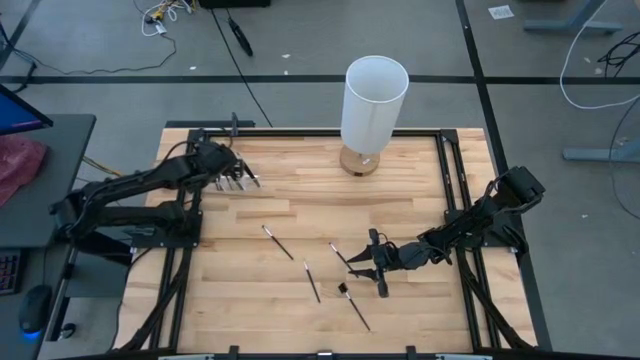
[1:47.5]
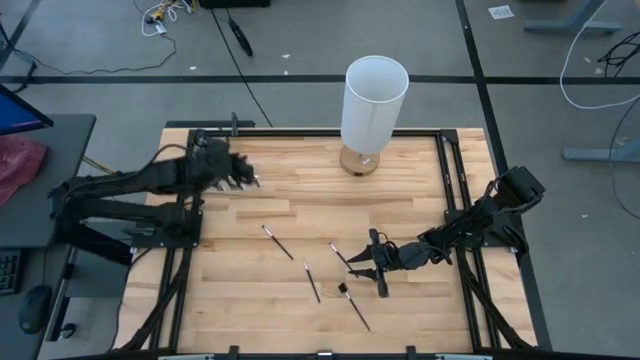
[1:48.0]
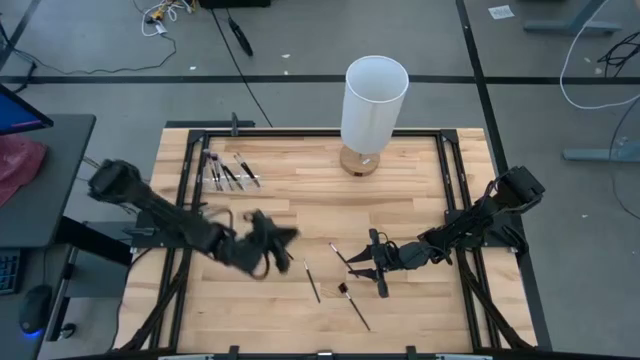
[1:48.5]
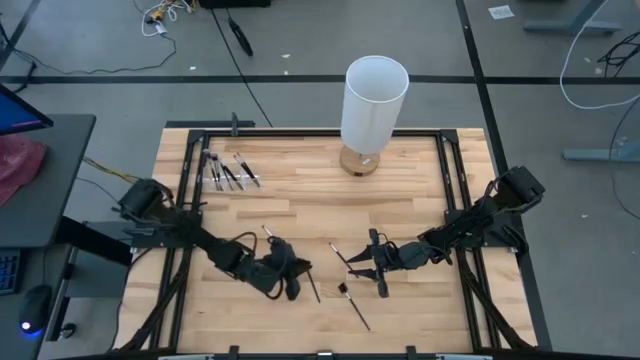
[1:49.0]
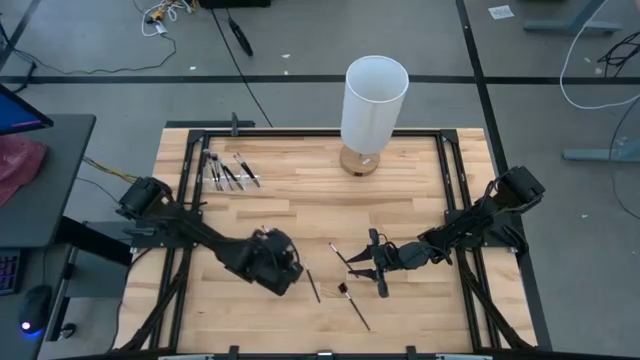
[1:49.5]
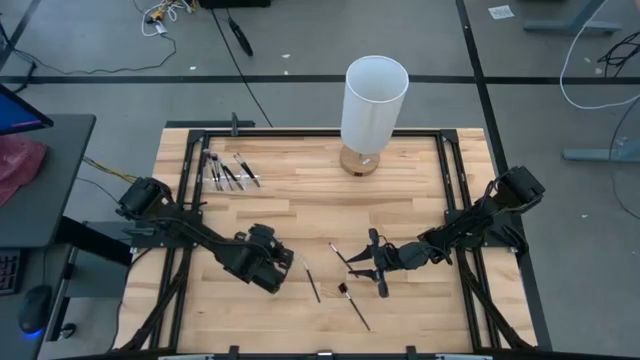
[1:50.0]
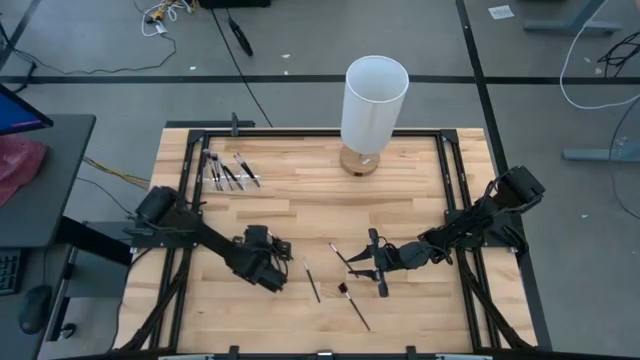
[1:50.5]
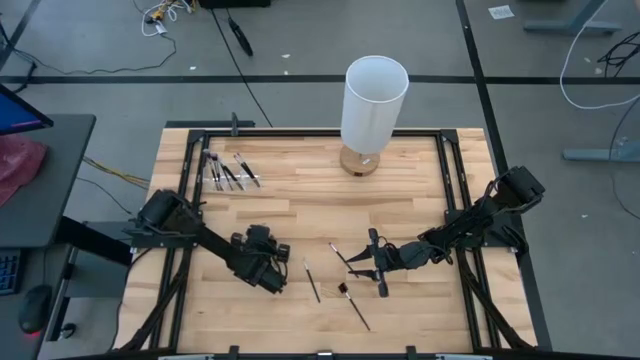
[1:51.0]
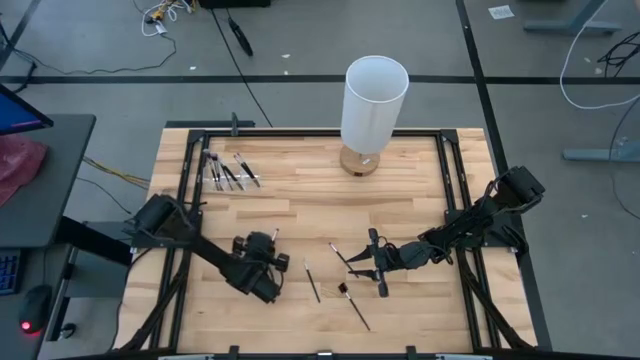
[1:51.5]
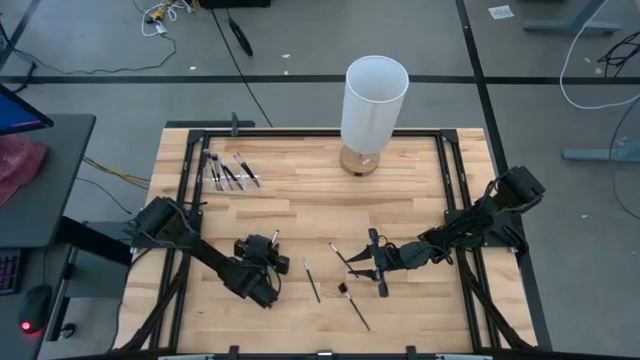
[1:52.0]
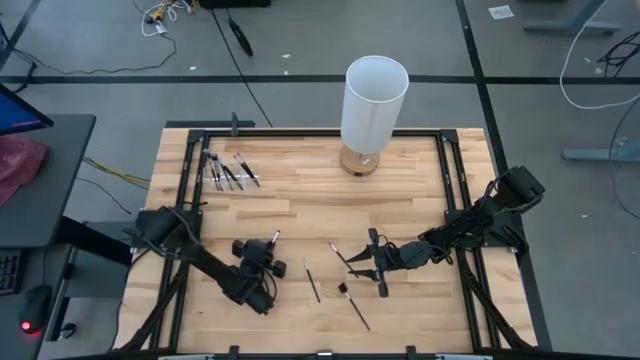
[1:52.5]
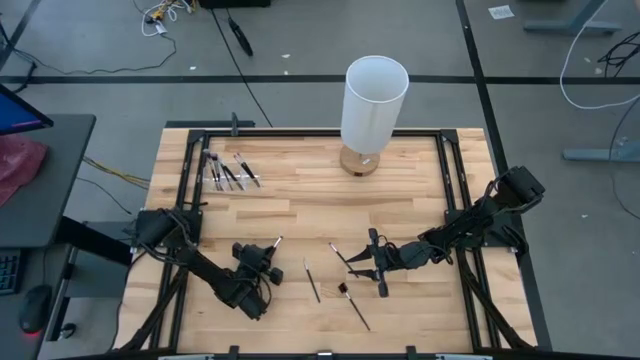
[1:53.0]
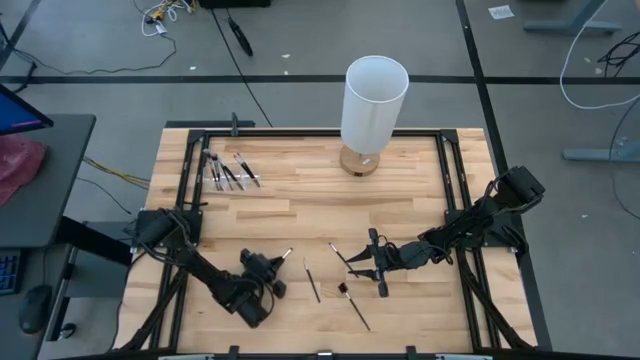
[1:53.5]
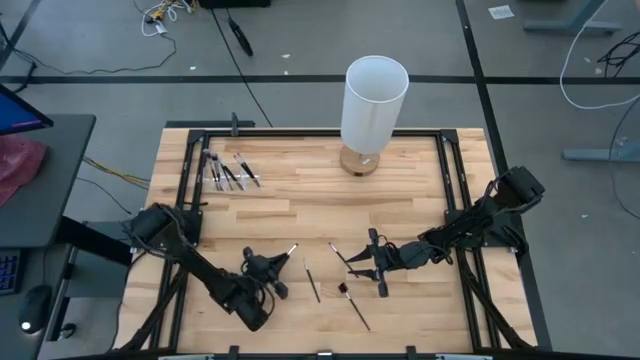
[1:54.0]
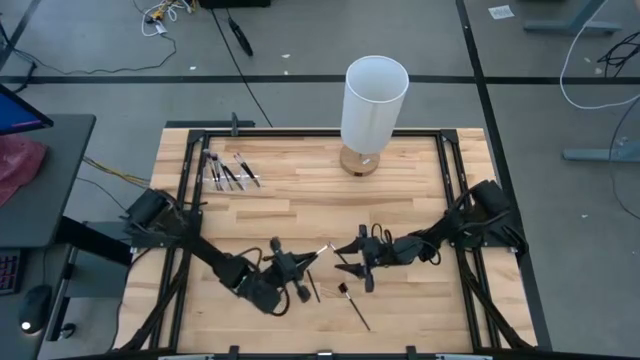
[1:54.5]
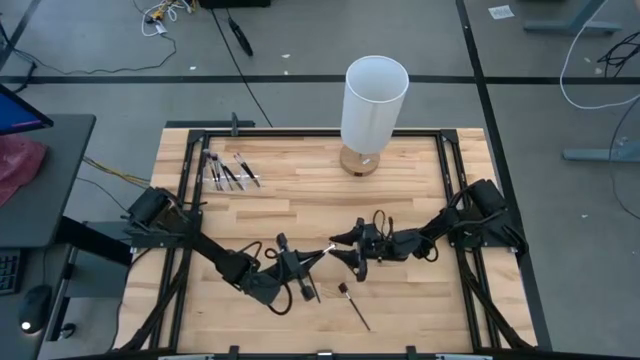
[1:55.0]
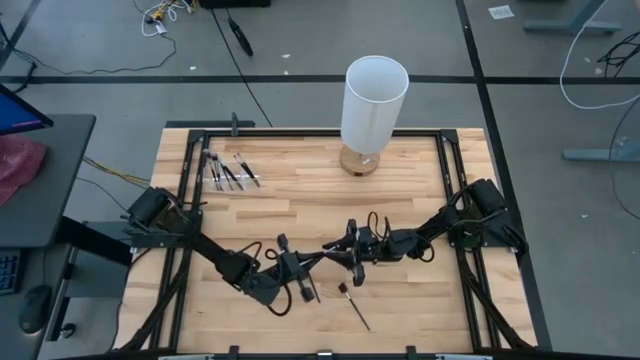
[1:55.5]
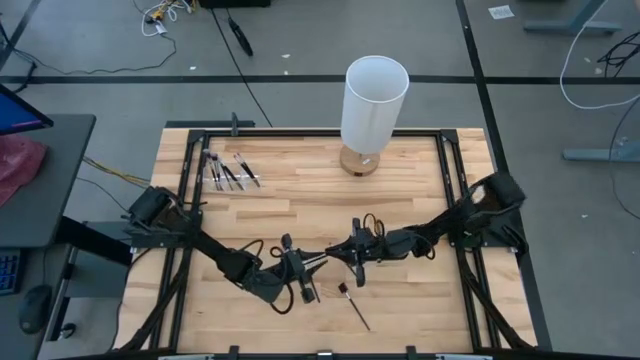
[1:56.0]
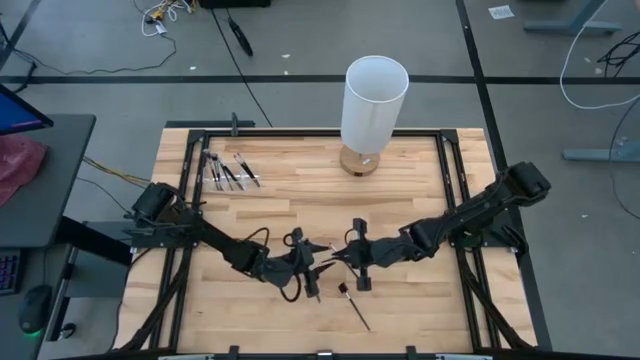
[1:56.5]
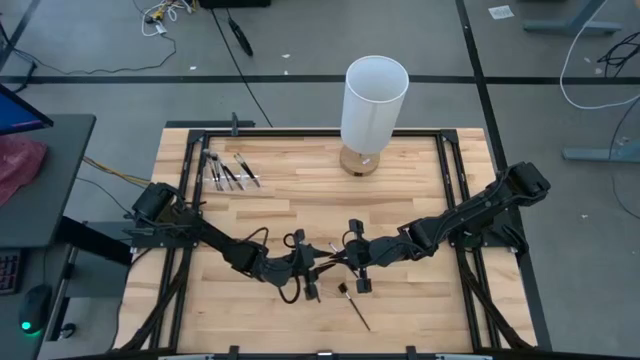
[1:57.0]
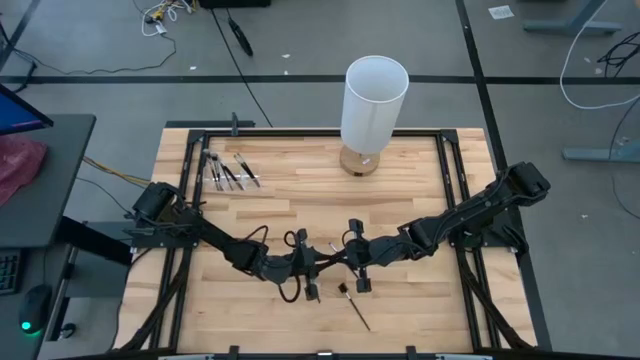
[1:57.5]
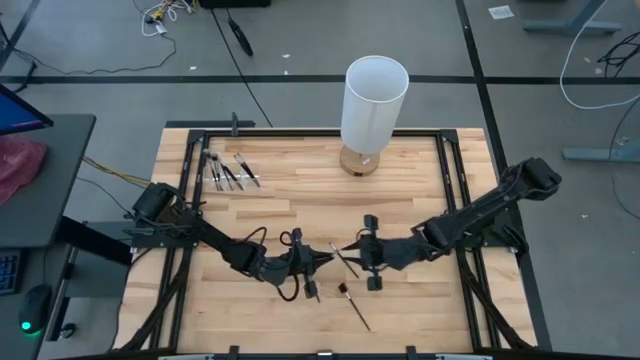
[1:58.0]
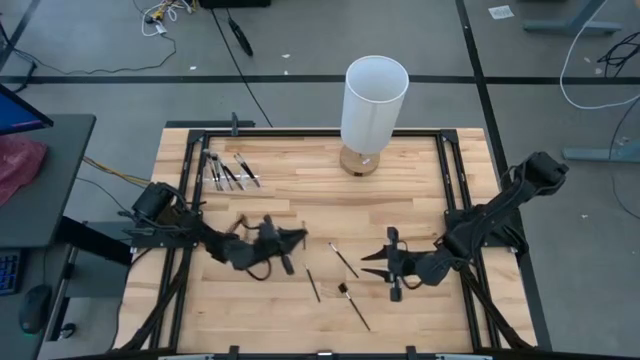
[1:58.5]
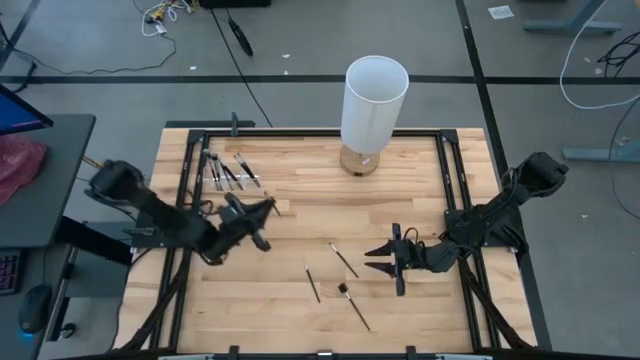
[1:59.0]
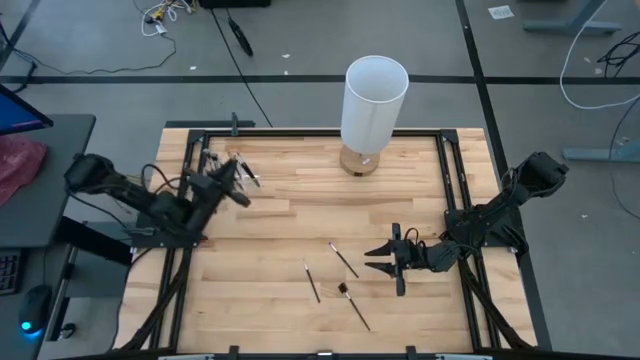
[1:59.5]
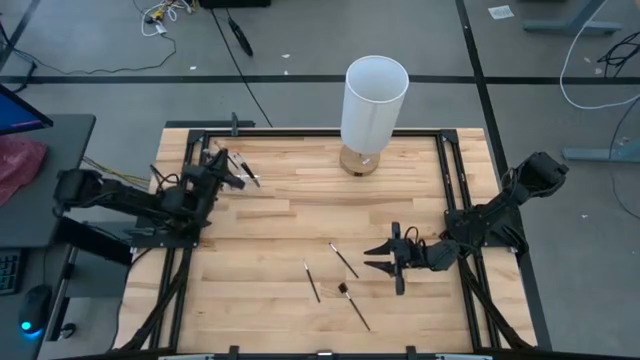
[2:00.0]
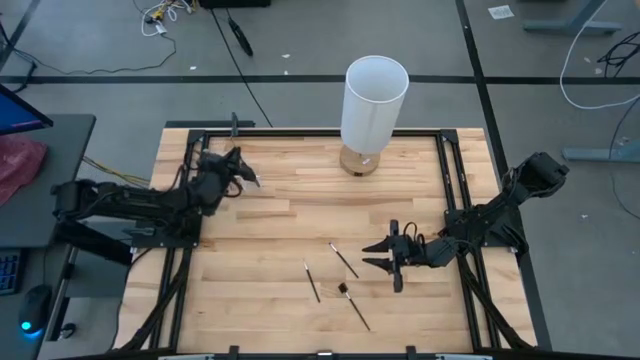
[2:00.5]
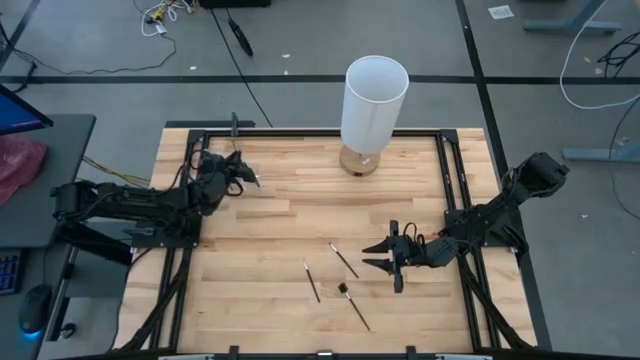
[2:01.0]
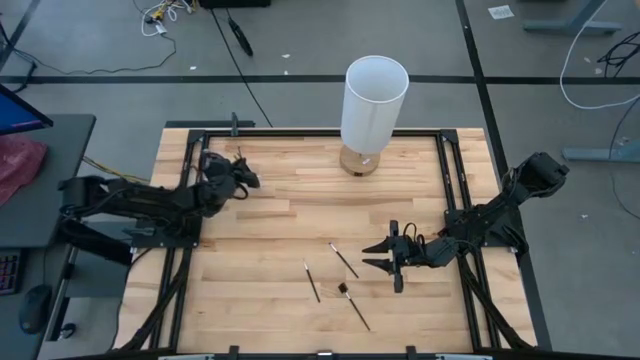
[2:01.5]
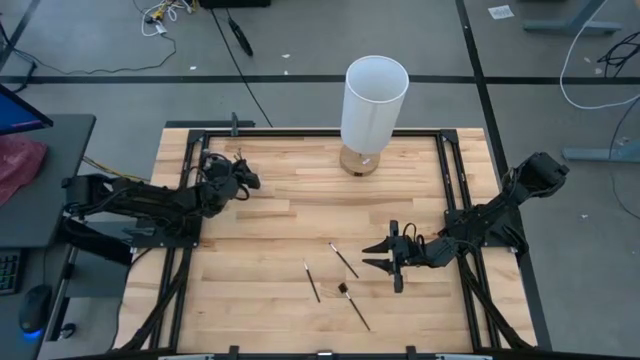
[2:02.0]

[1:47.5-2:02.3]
Task: Put items in baskets/containers
Put the black eyeshadow brush into the transparent organizer

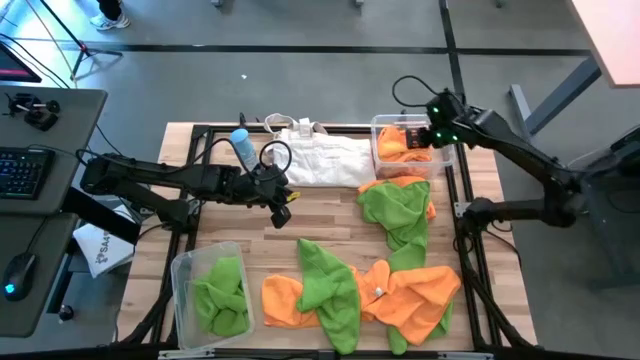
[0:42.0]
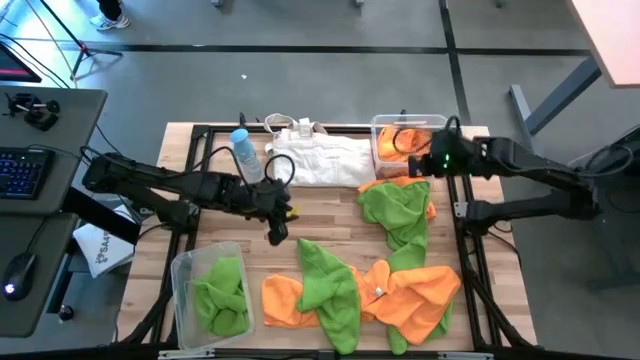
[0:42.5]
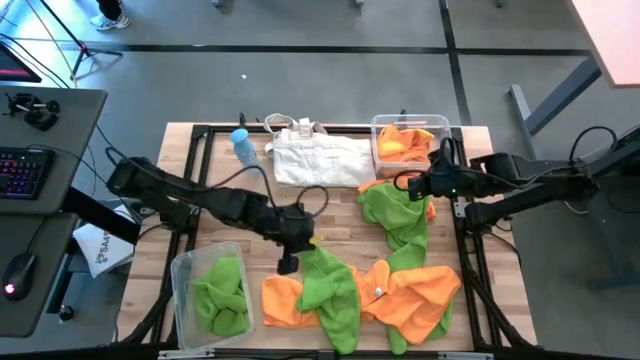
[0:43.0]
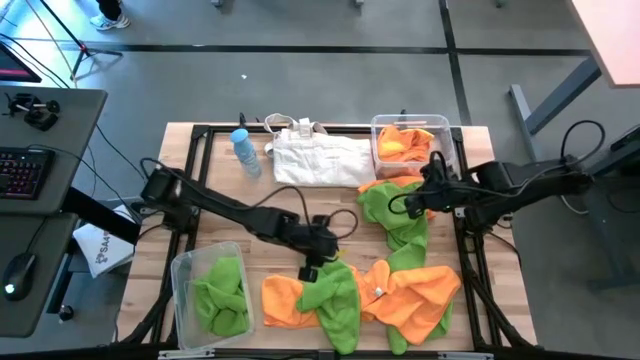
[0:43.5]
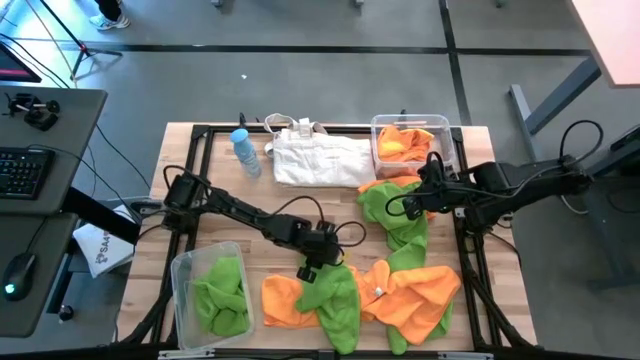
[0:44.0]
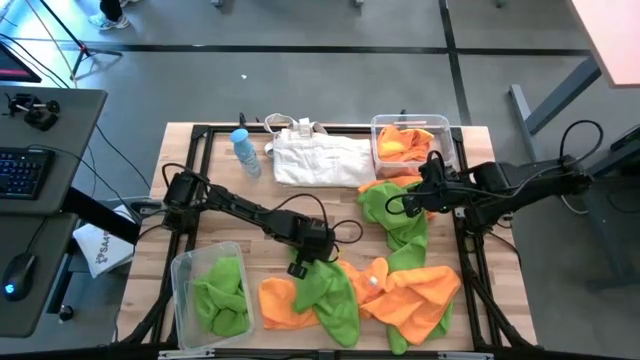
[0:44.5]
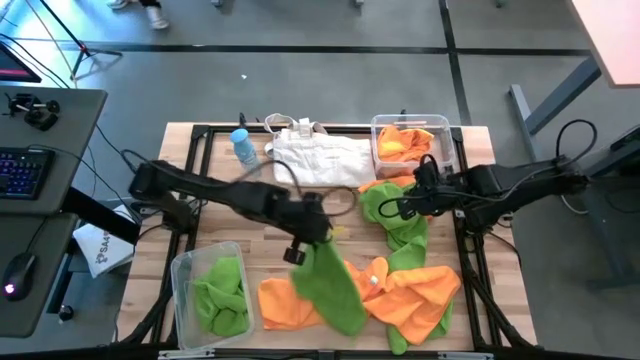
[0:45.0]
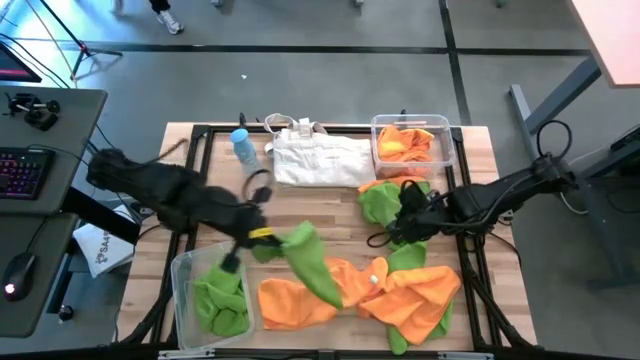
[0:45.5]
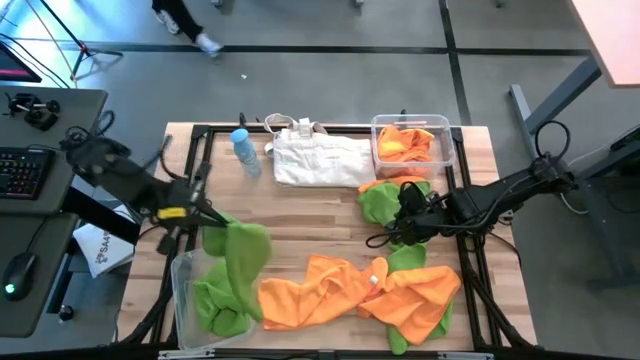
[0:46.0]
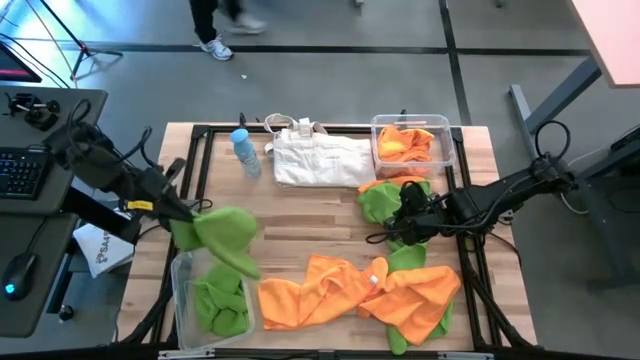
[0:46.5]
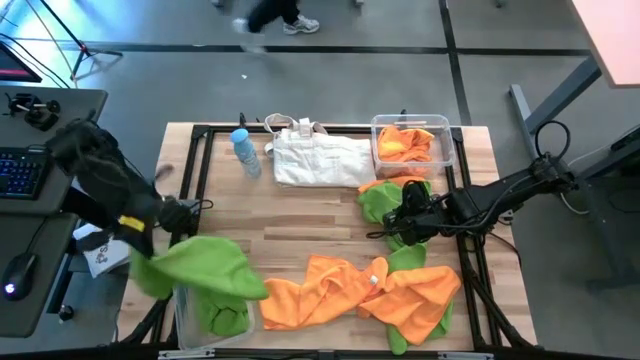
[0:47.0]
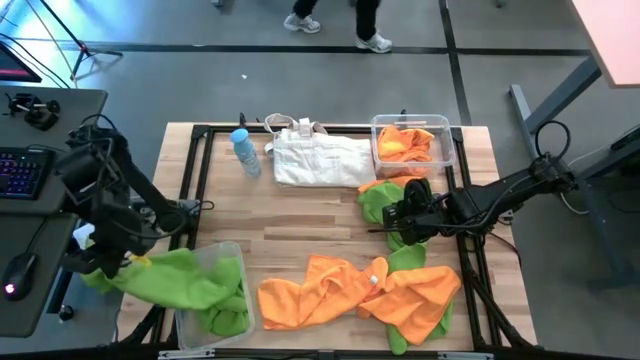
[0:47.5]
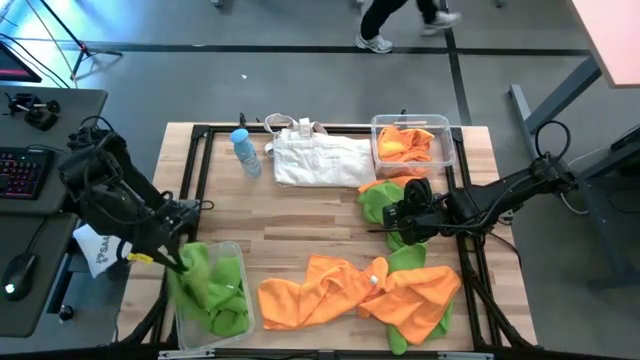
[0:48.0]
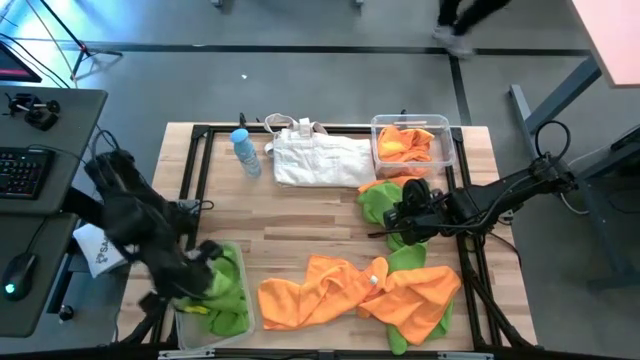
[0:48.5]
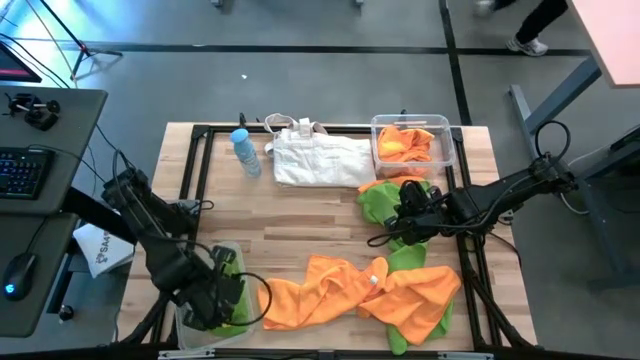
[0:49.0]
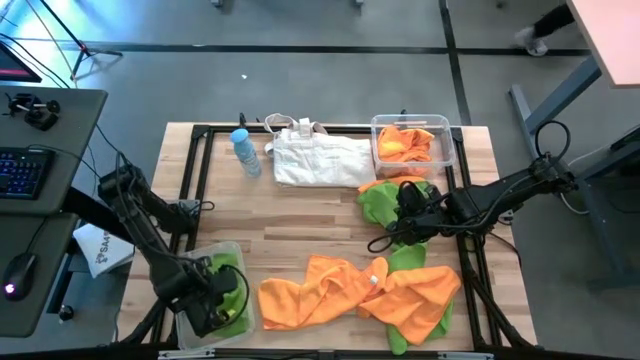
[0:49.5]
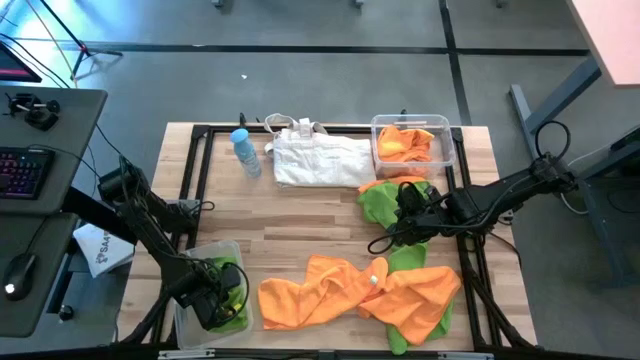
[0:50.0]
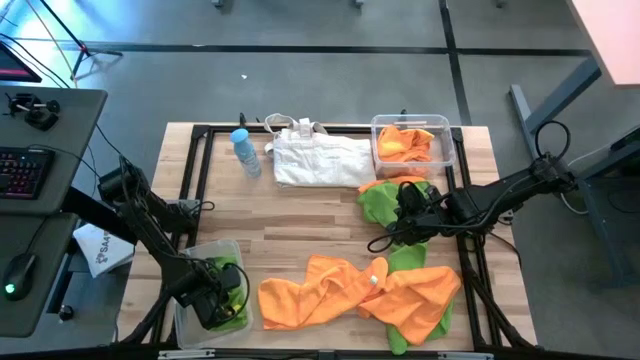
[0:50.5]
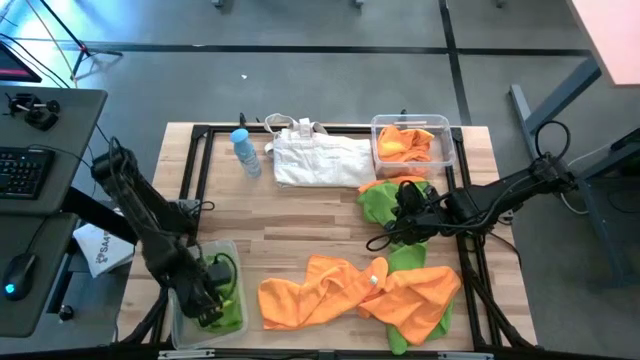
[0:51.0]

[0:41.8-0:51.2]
Task: Sort microfiber towel by color & place in baskets
Put the green microfiber cloth into the bottom transparent bin
